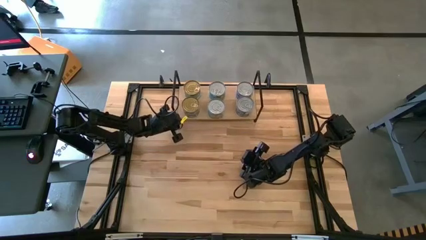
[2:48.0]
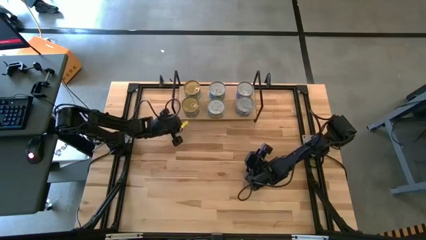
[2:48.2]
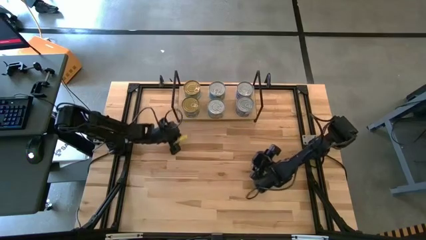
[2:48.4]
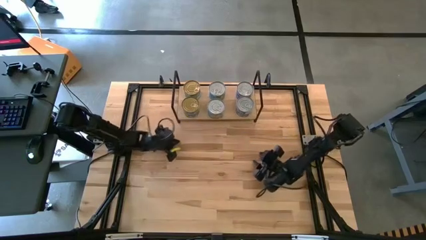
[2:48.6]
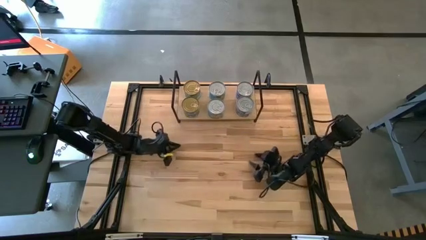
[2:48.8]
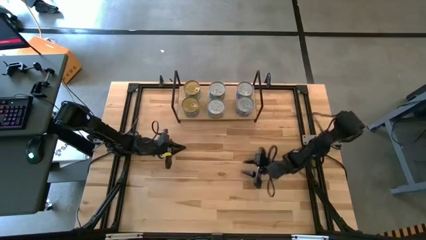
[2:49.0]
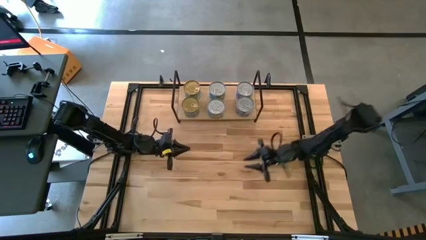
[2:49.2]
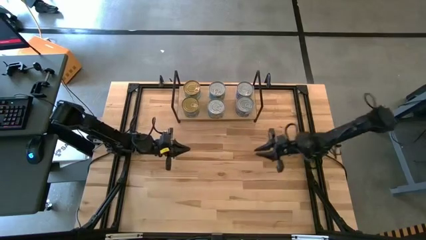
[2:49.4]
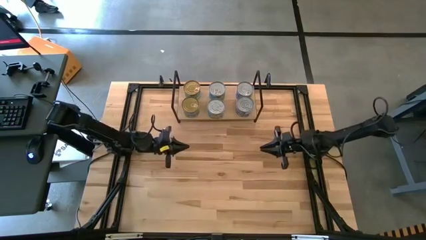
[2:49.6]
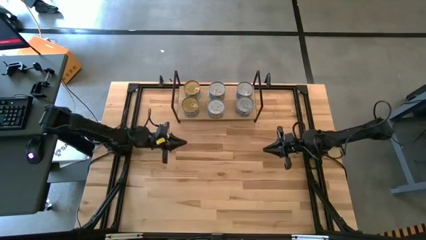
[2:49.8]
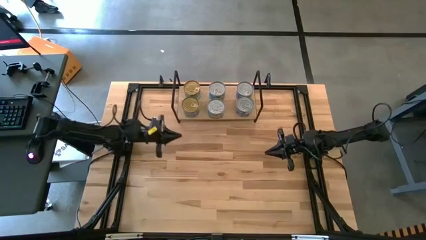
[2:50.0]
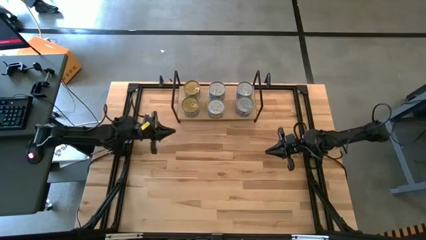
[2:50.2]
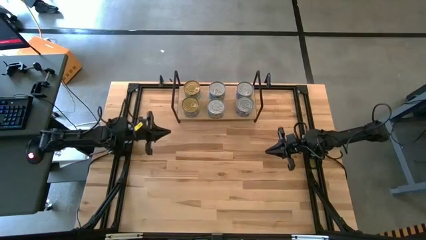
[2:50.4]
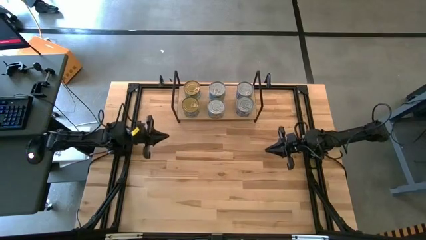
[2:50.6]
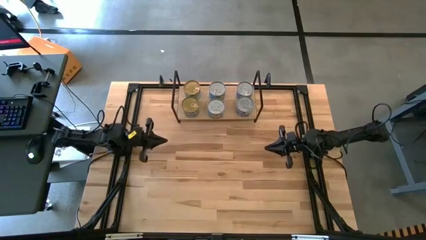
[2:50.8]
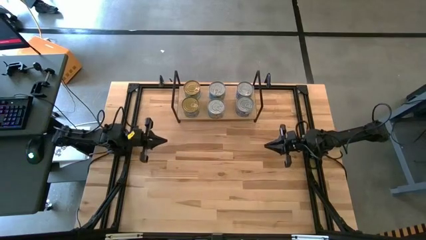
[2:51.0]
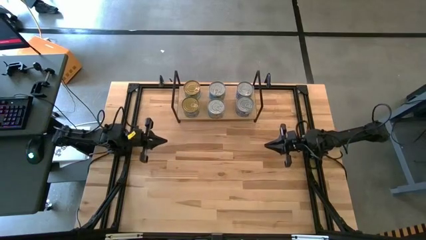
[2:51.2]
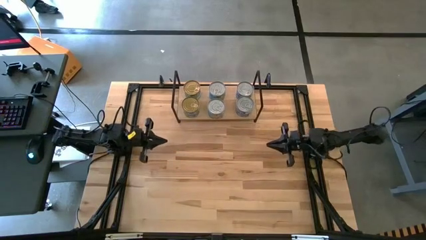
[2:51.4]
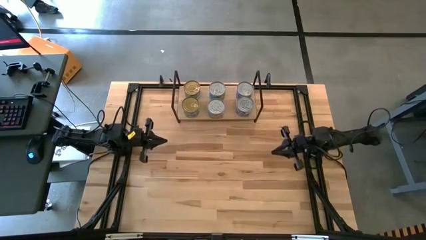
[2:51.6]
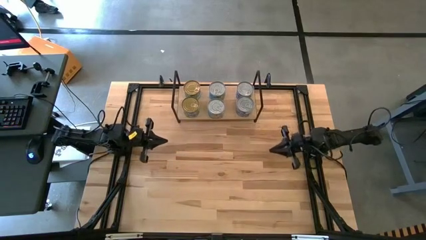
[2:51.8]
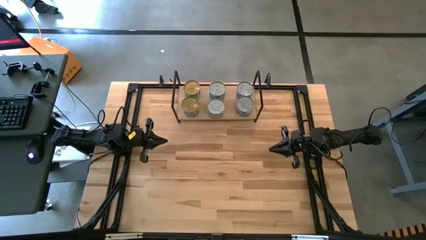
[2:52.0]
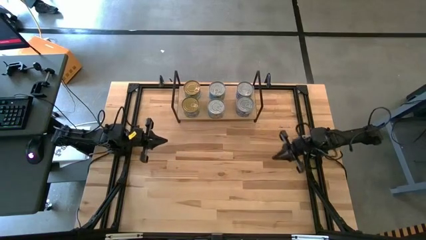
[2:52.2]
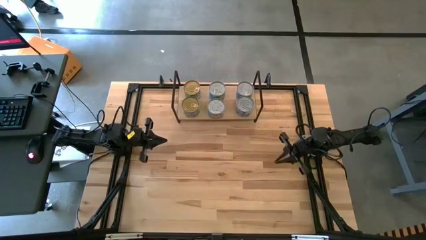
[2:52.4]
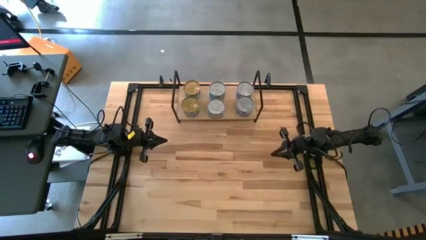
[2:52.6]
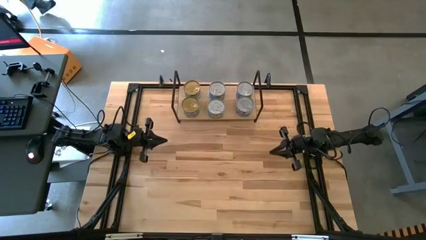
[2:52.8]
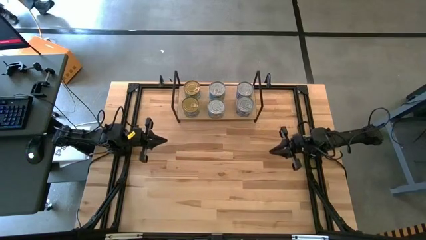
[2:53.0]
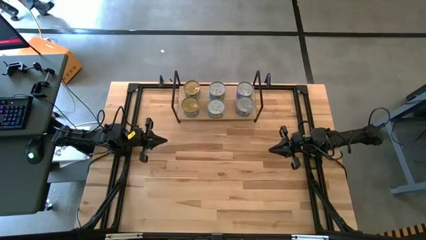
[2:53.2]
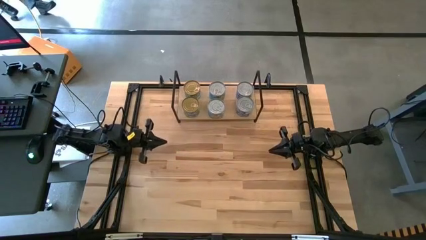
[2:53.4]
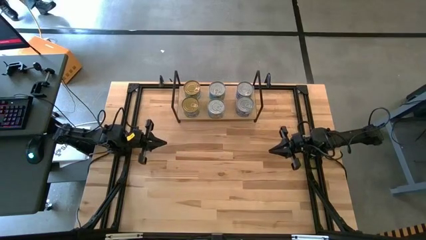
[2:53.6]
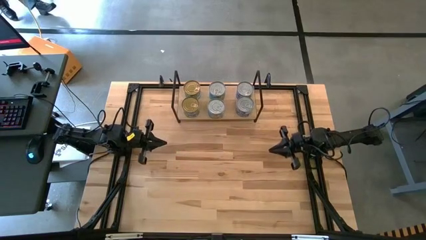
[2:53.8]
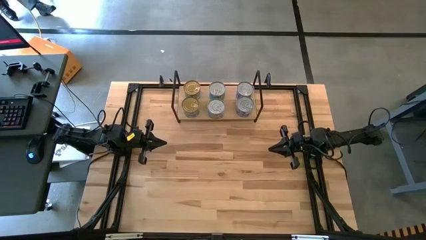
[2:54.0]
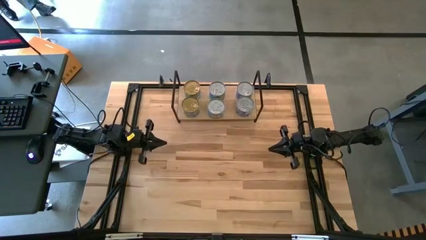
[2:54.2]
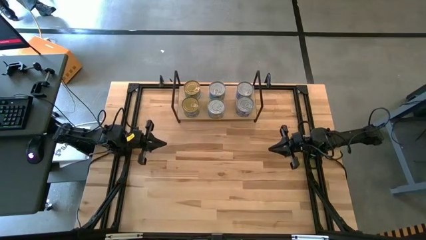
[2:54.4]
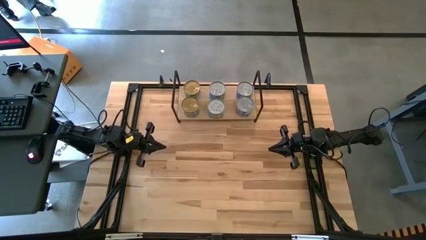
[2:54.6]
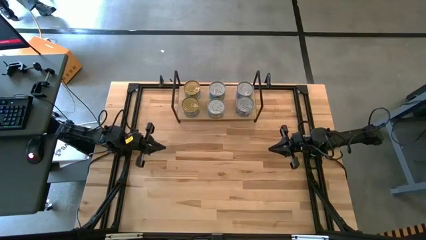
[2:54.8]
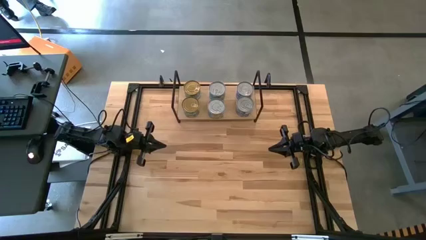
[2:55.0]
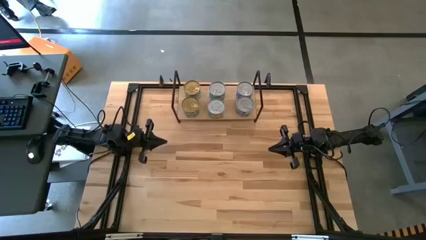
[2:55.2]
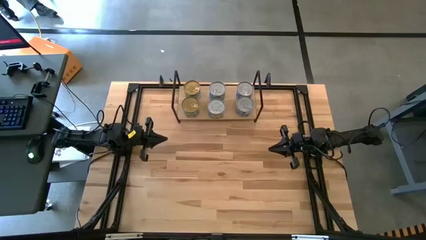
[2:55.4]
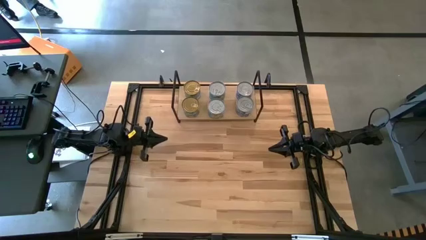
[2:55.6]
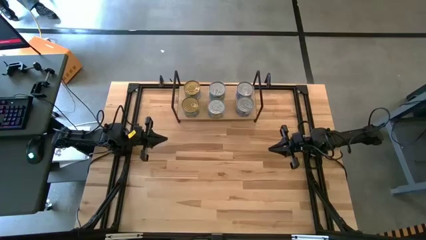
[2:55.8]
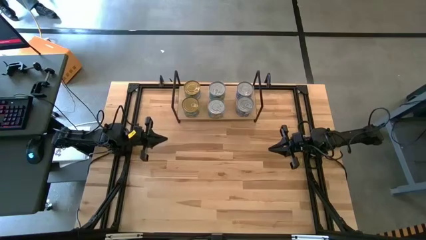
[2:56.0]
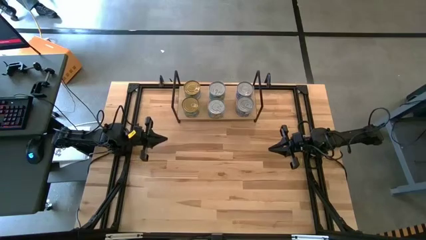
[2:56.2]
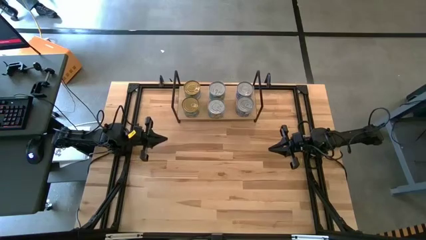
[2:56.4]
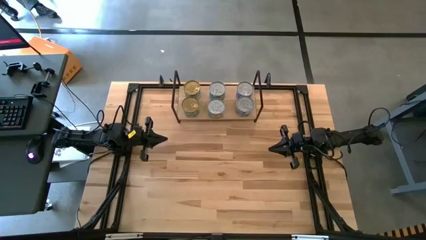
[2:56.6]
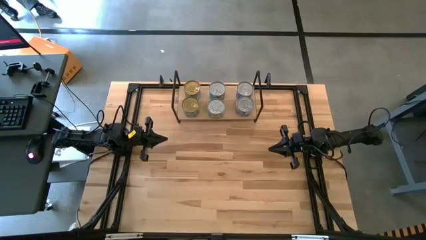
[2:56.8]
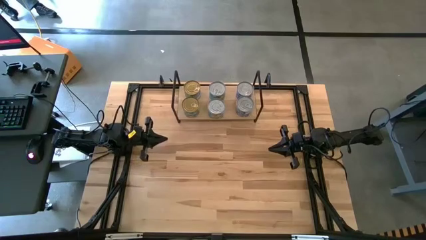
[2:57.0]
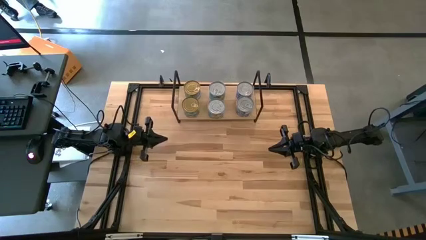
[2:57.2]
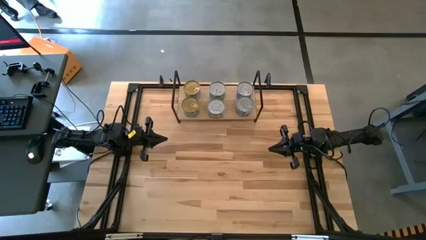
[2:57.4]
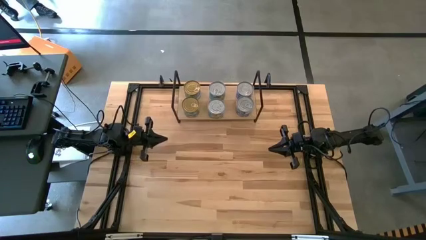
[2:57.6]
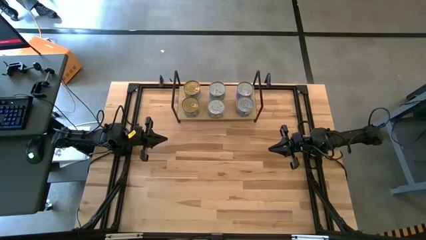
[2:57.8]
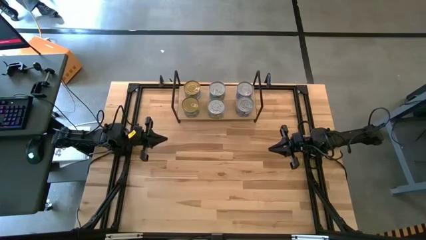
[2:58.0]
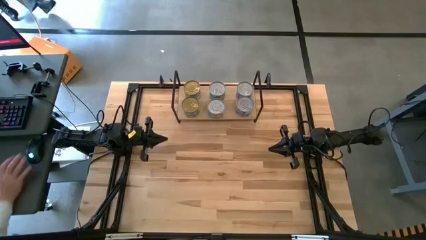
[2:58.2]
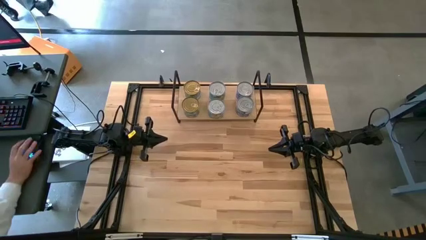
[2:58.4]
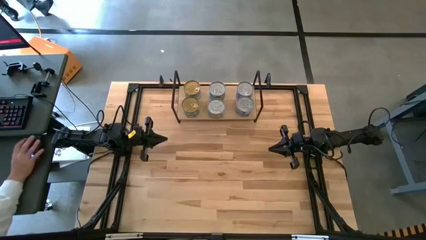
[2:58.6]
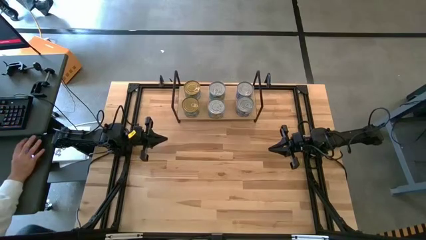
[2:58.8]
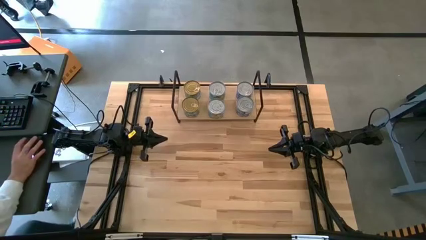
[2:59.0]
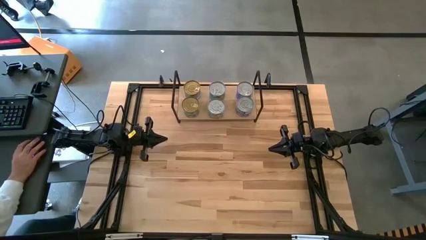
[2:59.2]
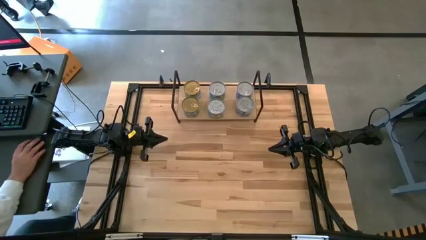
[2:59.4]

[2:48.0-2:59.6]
Task: Stack canned seafood by type on shelf
Return to Home Position

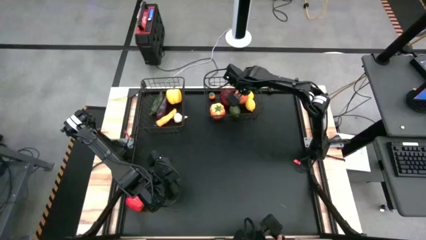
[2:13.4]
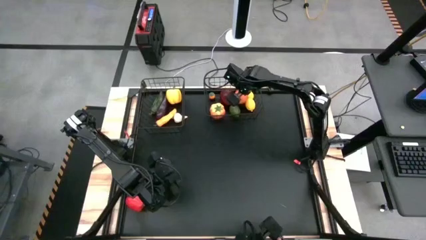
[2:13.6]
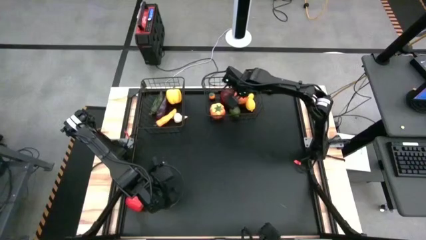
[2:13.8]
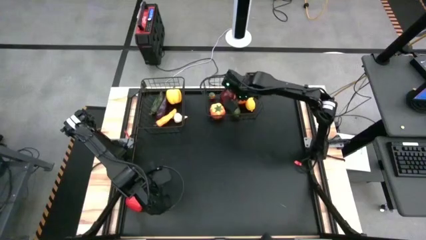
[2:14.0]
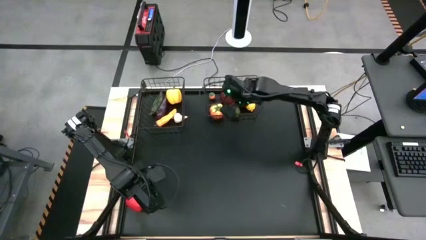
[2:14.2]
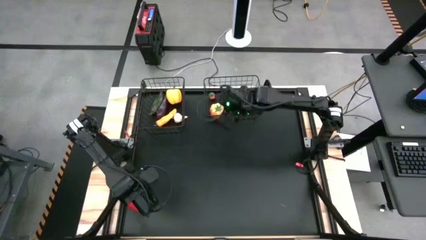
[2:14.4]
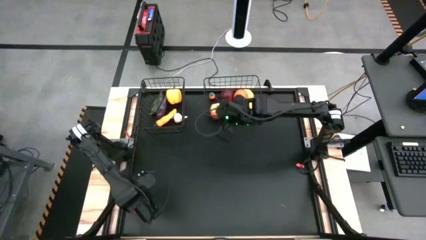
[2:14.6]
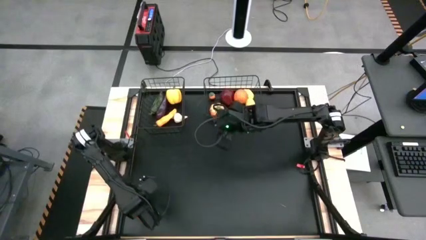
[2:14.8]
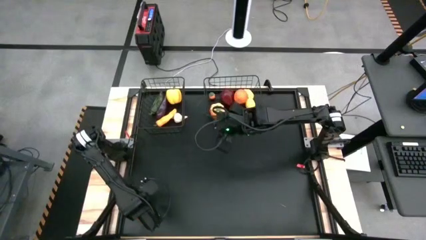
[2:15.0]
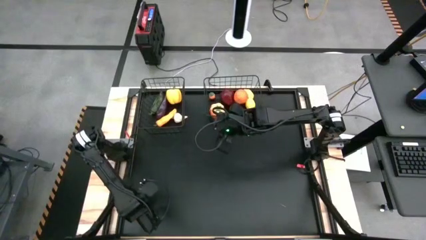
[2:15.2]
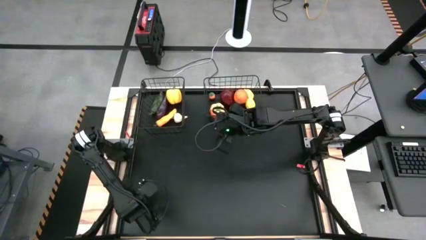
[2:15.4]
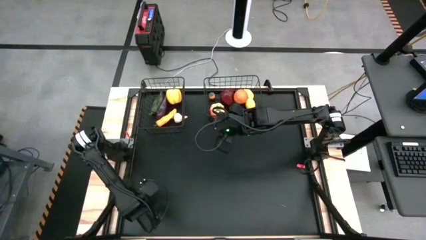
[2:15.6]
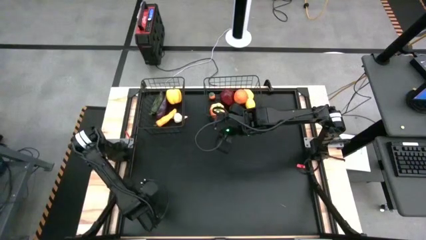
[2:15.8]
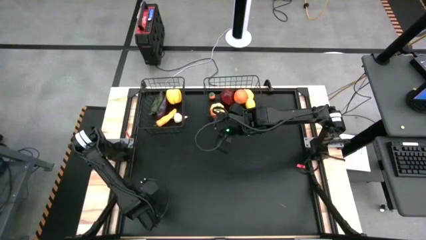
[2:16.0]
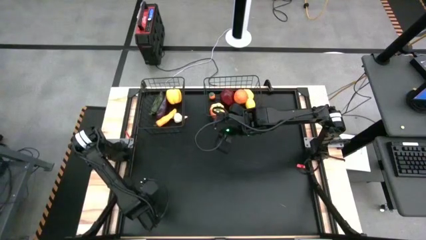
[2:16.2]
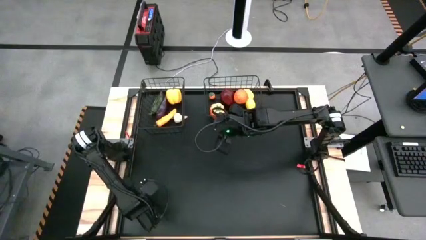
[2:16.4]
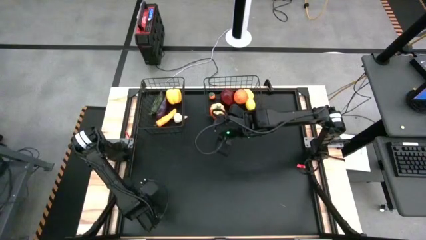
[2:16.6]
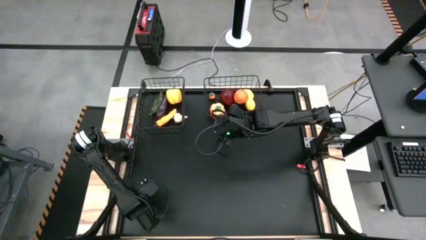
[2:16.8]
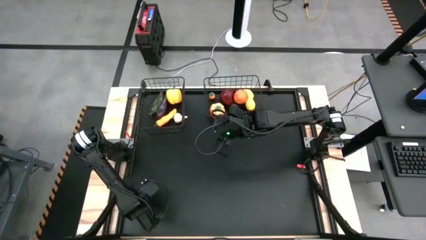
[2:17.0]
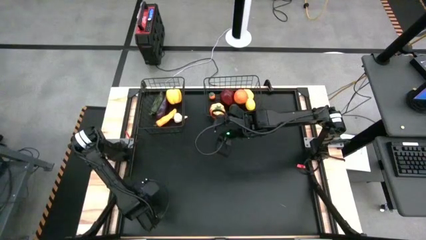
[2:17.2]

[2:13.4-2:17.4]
Task: Sort produce into baskets
Put the red bell pepper into the left black wire basket
